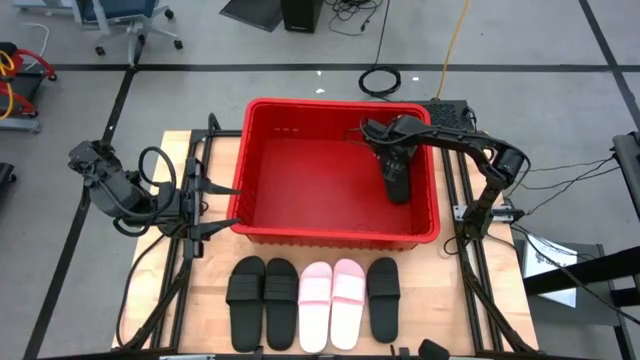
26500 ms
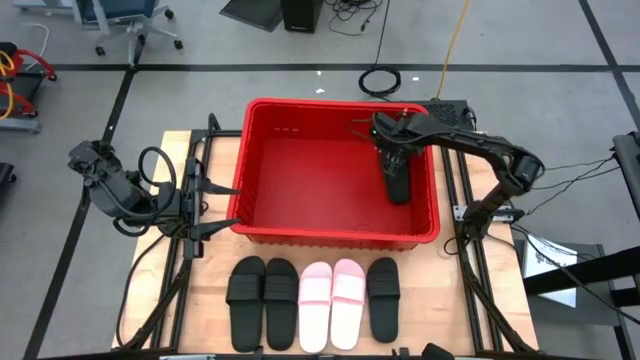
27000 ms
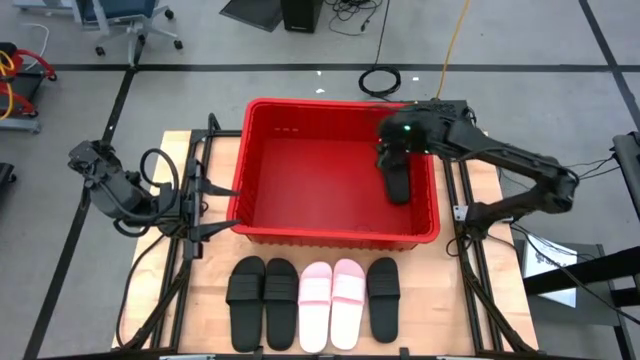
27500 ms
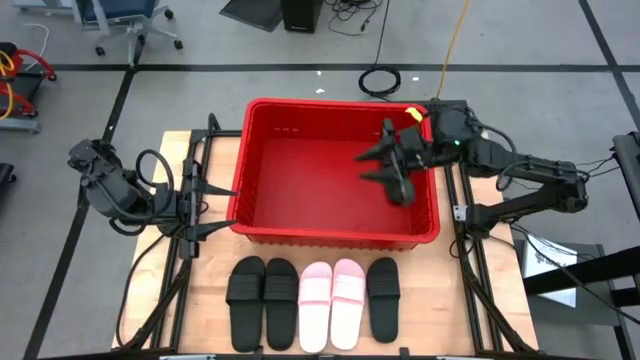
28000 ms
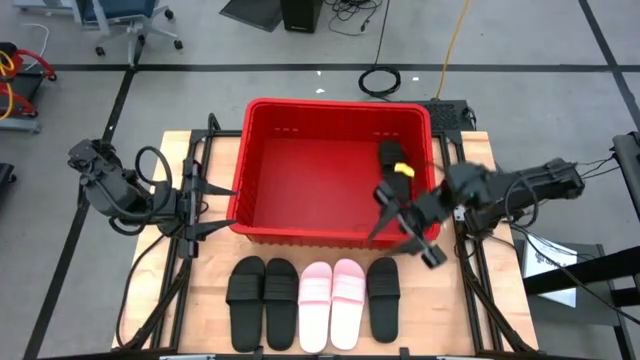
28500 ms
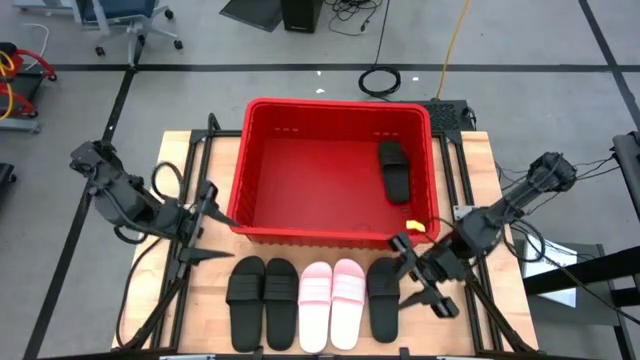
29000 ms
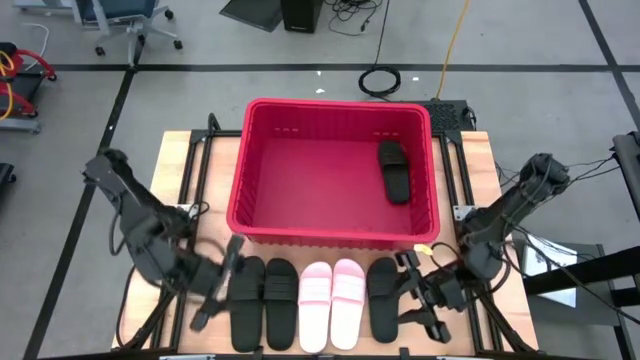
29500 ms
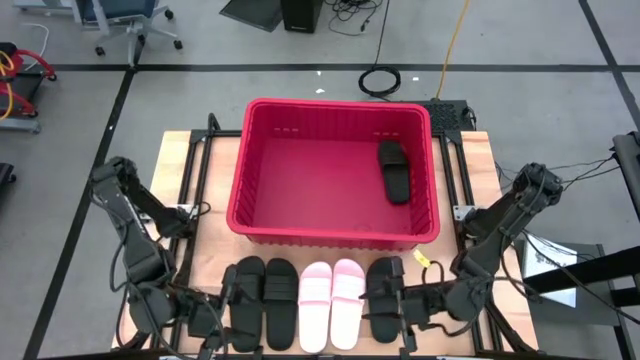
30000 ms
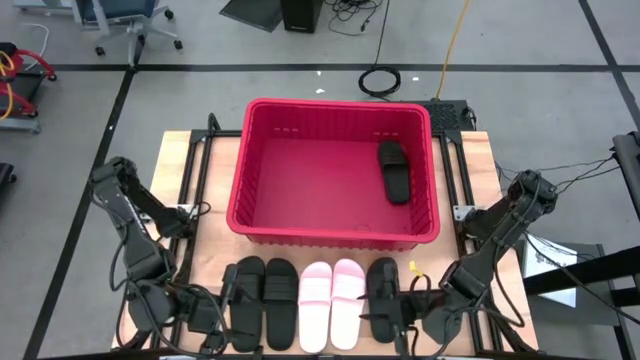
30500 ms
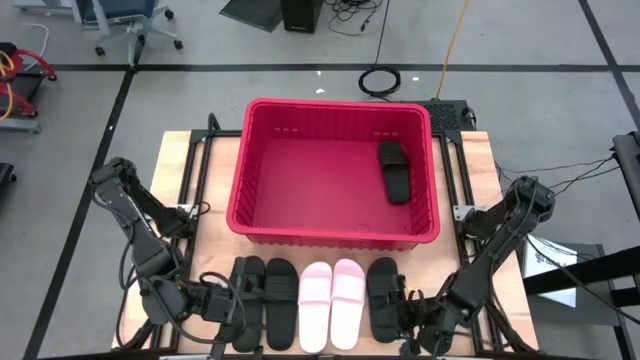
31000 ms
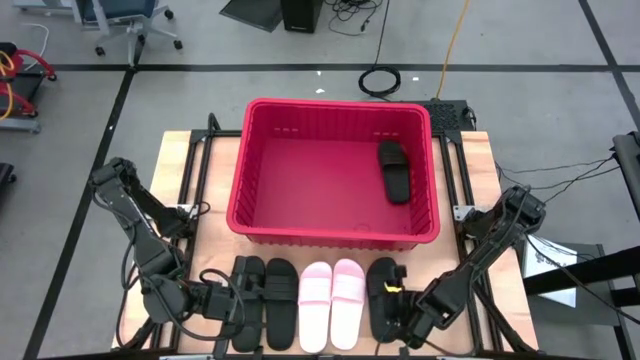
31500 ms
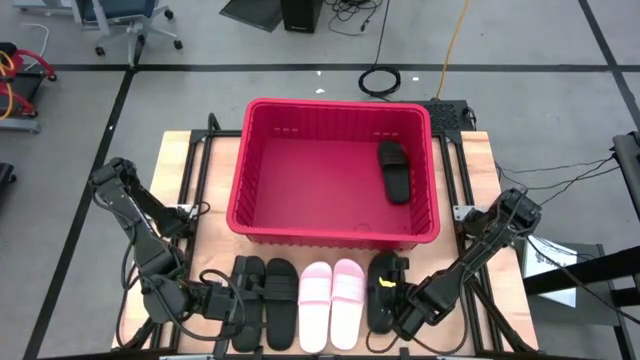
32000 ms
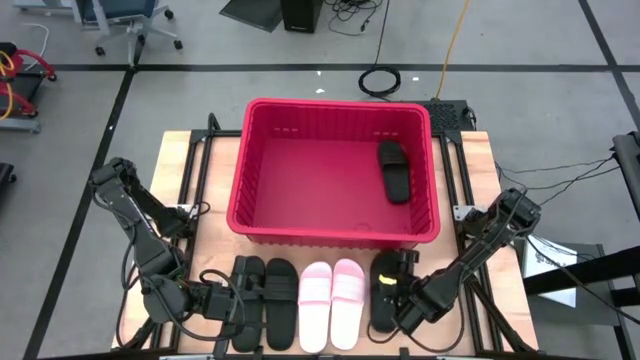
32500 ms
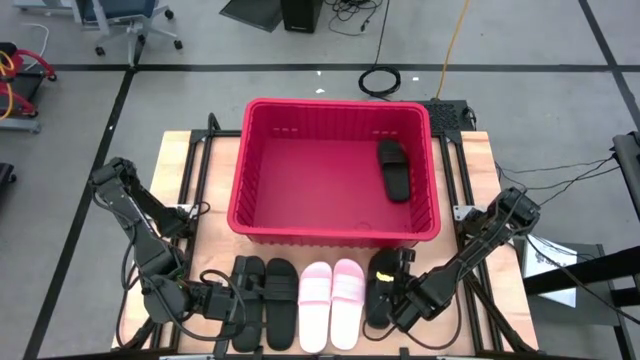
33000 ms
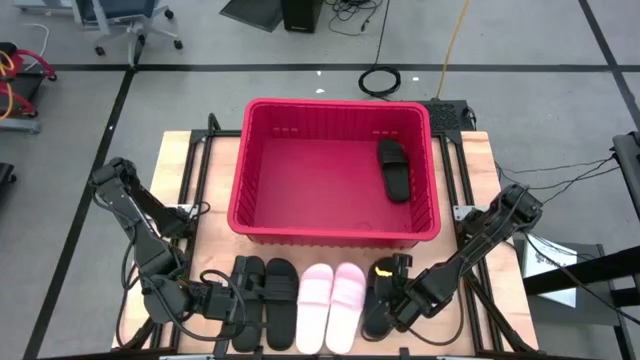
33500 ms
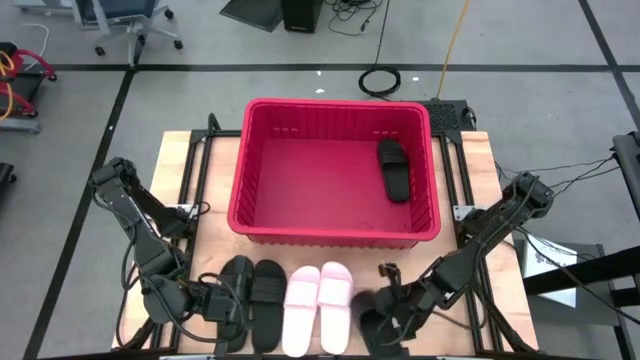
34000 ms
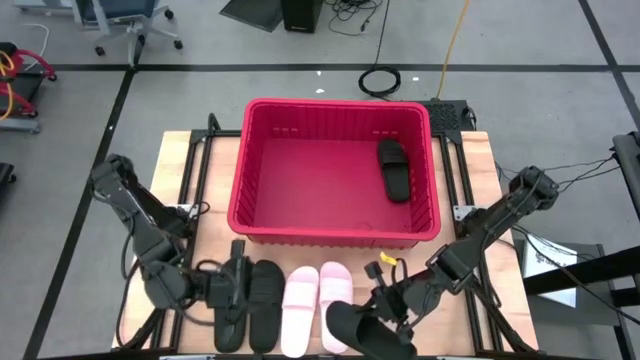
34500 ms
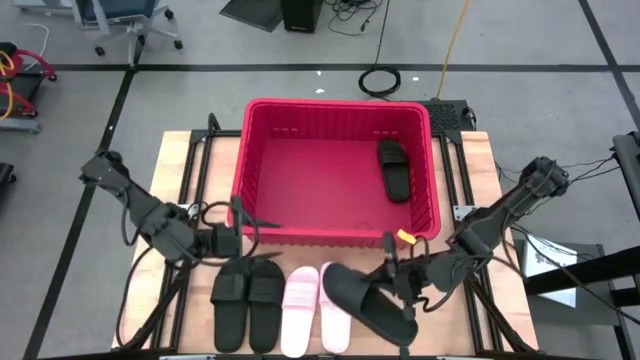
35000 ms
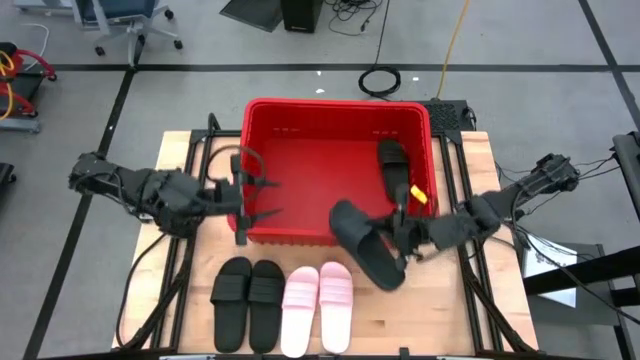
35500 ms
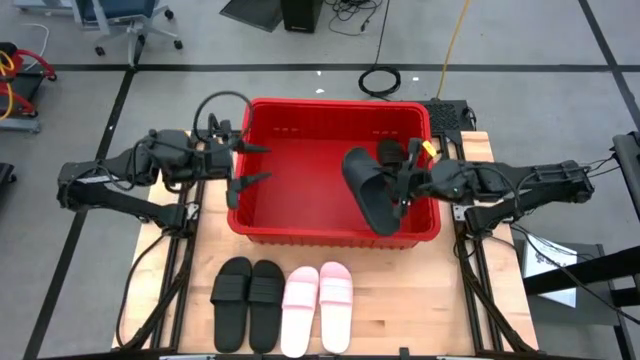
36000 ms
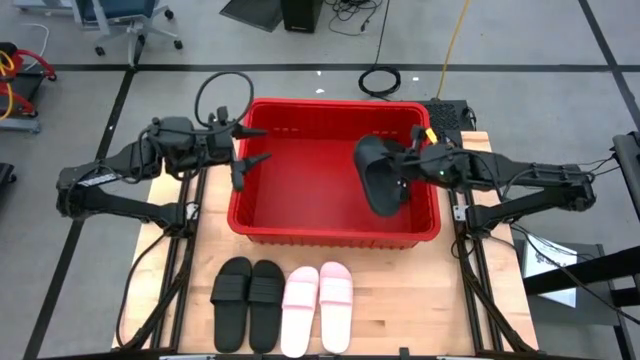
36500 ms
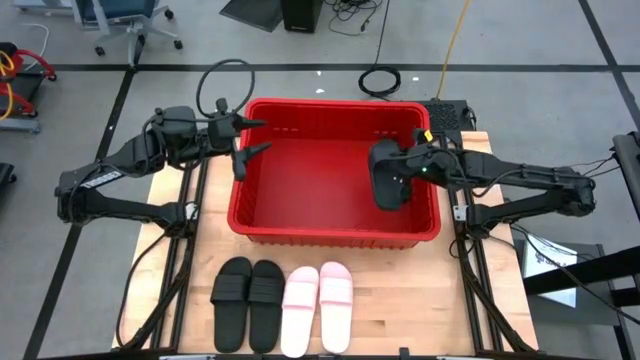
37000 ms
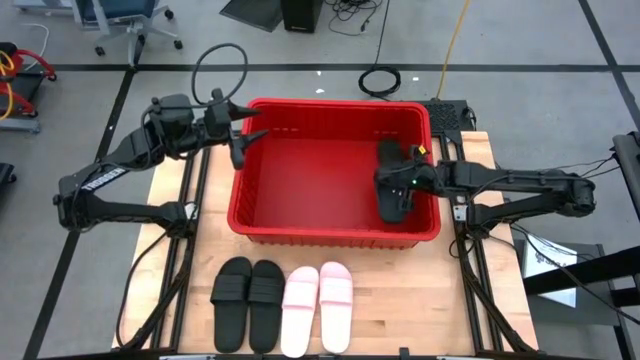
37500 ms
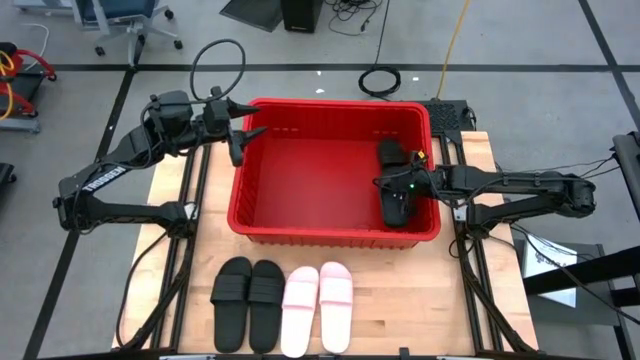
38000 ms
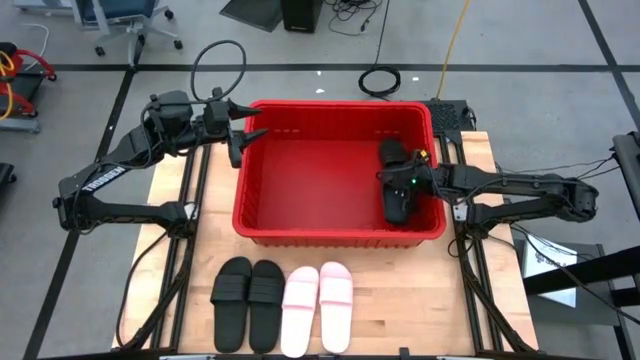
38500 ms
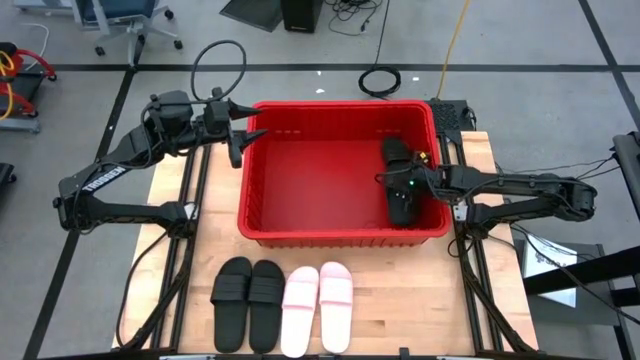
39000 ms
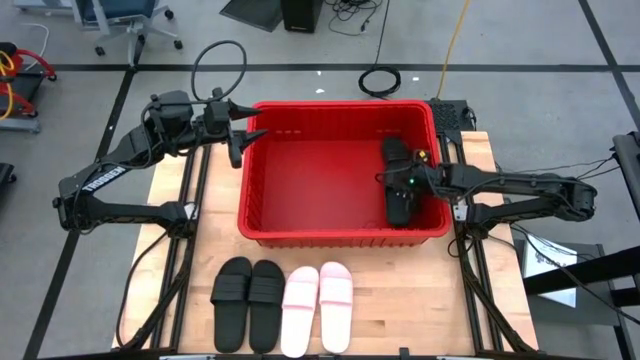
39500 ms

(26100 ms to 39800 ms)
Task: Pick and place slides into bin
Put the black slide into the red organizer bin

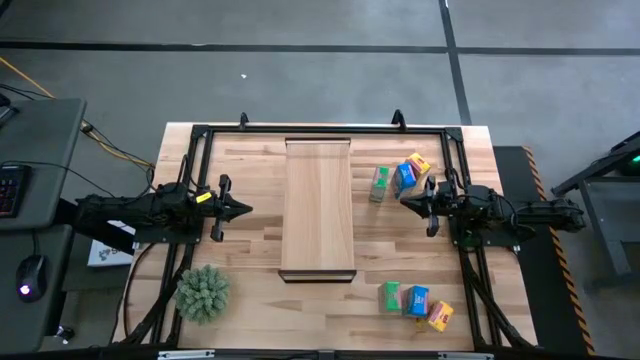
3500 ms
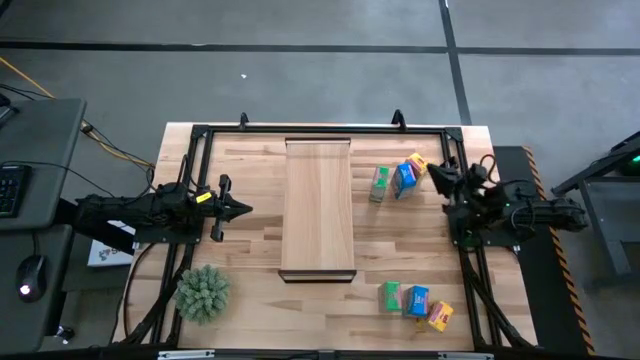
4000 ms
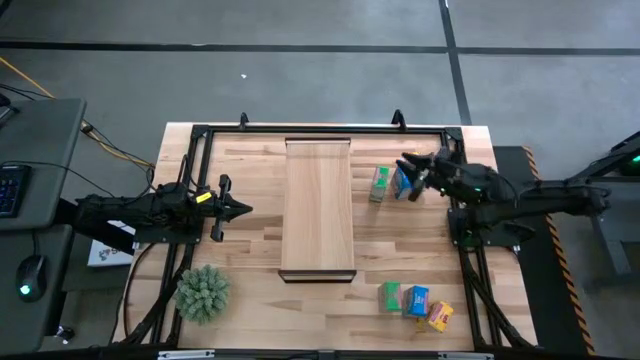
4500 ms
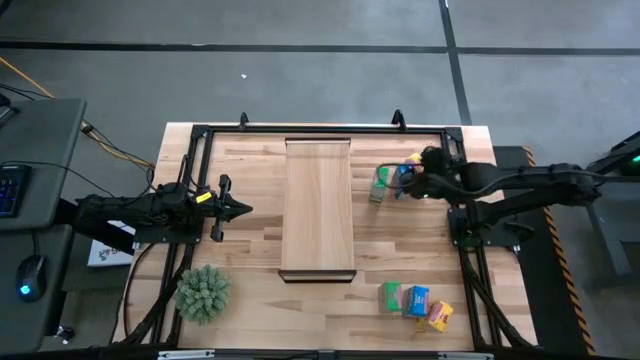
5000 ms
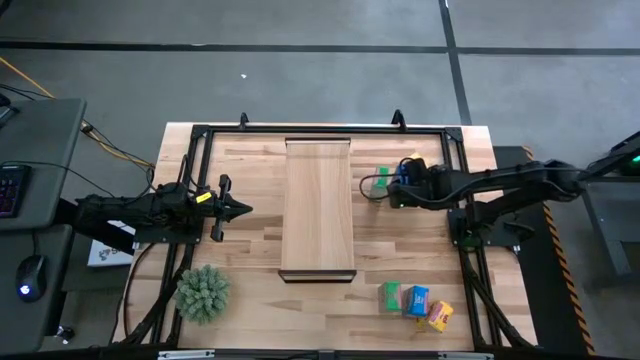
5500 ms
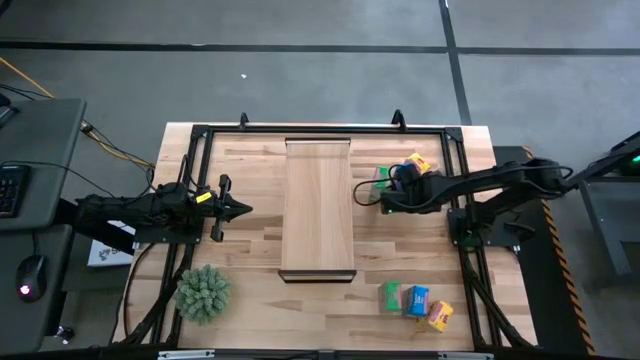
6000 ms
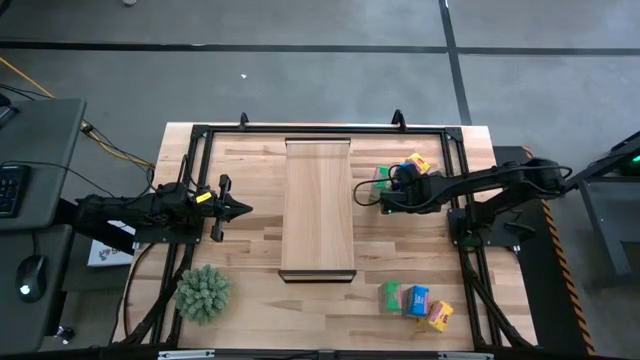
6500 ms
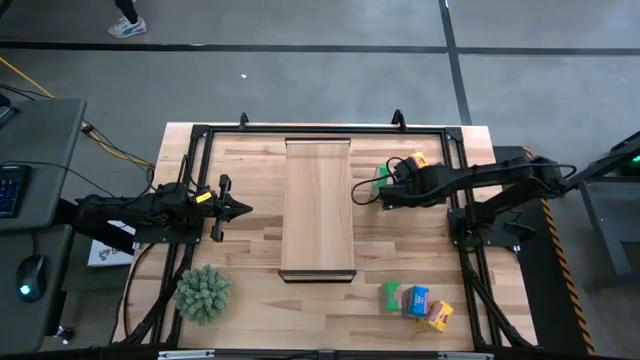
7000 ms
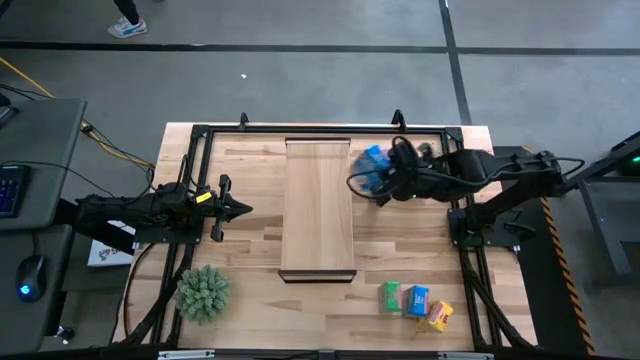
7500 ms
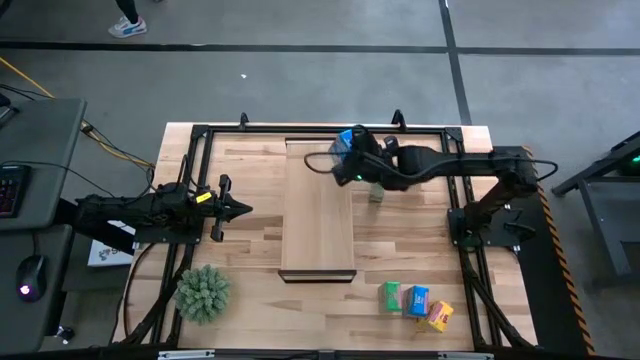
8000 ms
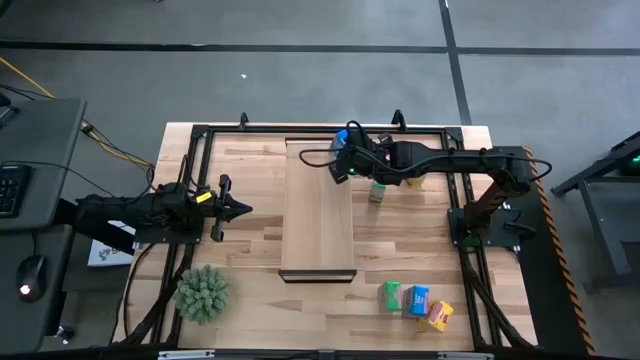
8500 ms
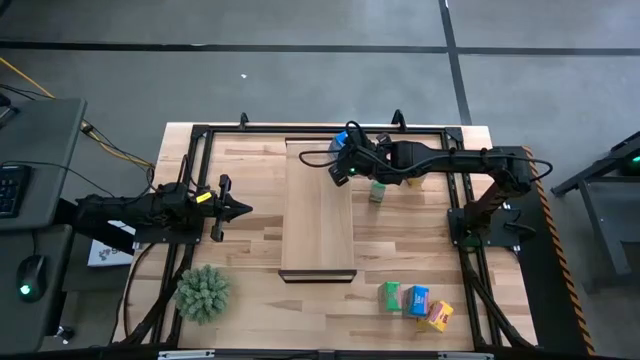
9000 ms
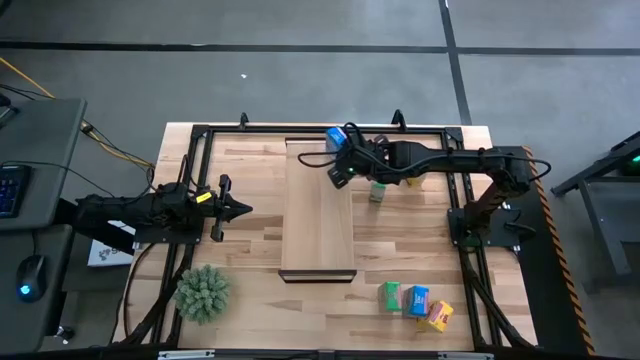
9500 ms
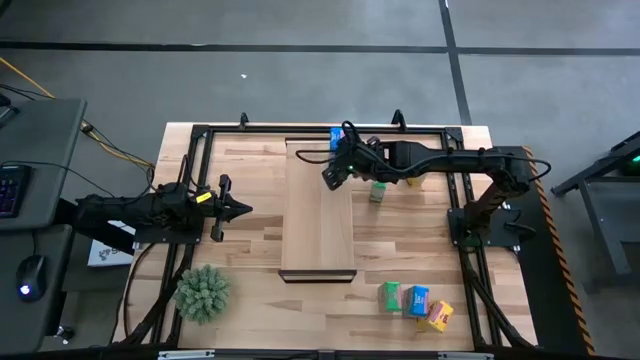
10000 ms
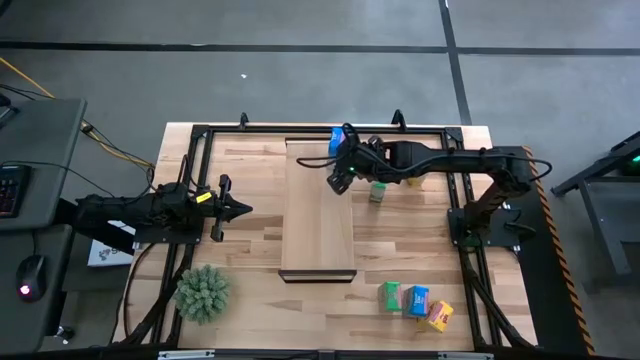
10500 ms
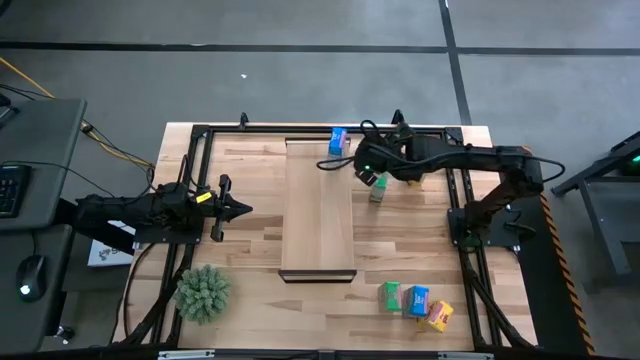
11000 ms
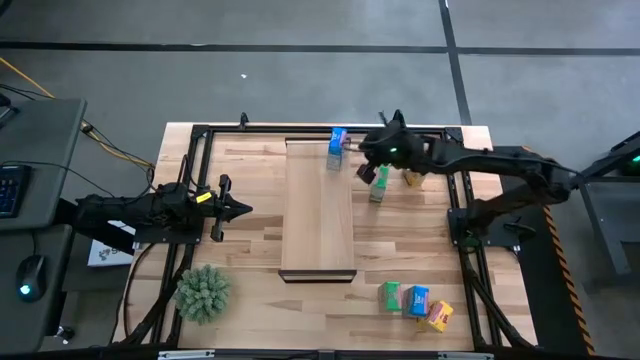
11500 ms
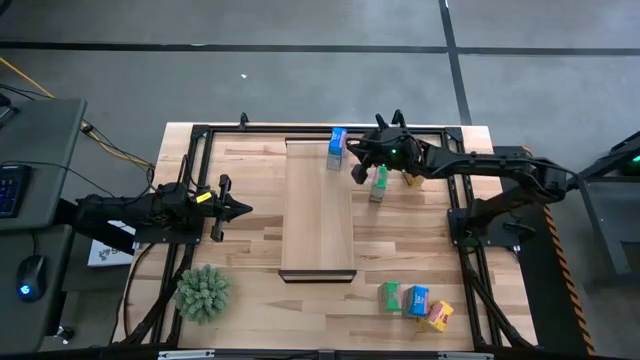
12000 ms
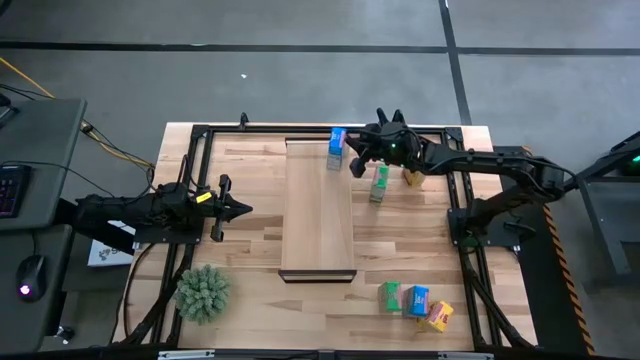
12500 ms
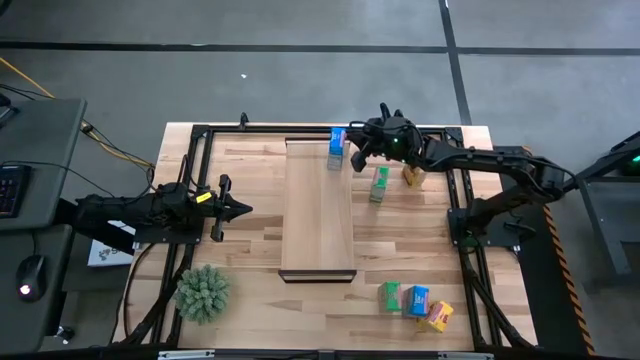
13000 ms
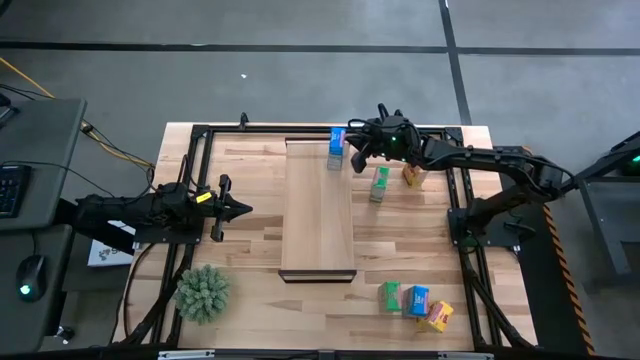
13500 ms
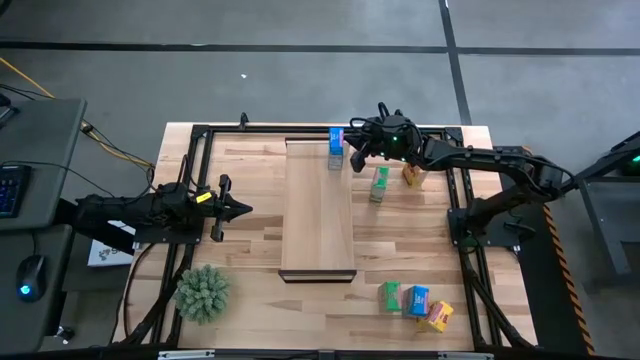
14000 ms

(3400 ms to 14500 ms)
Task: Stack cereal on shelf
Put the top blue cereal box on the shelf
